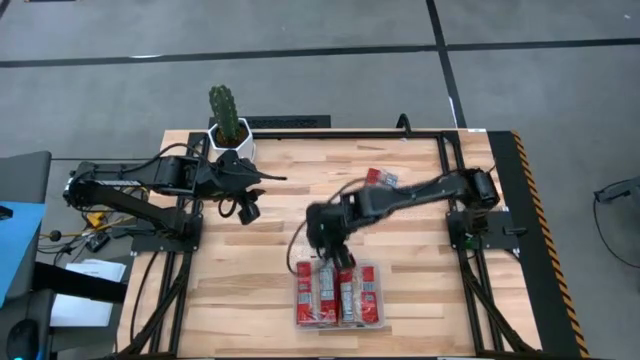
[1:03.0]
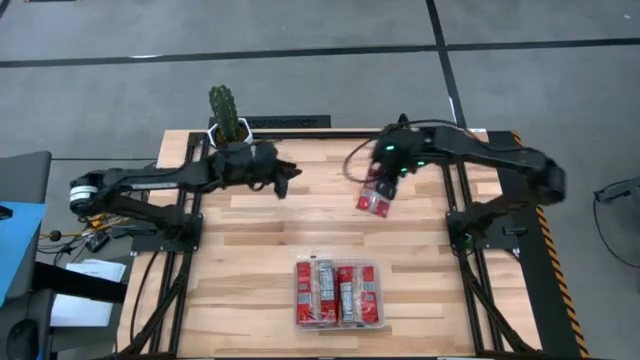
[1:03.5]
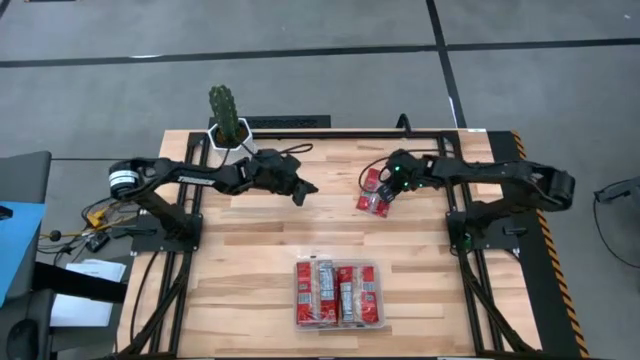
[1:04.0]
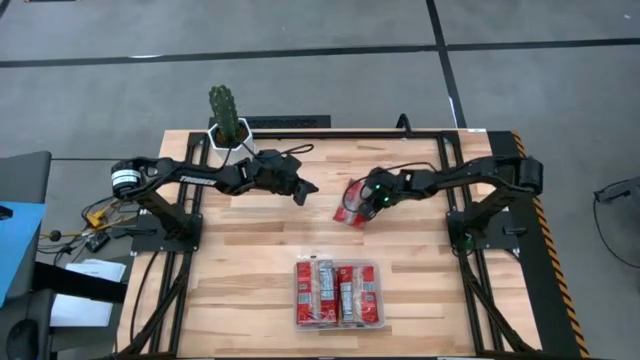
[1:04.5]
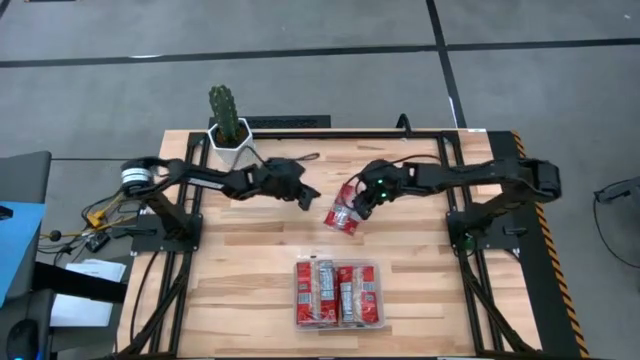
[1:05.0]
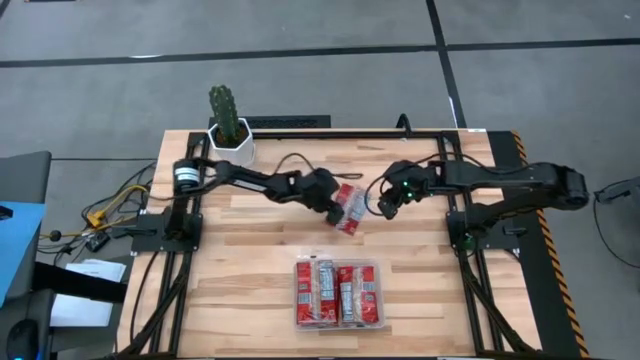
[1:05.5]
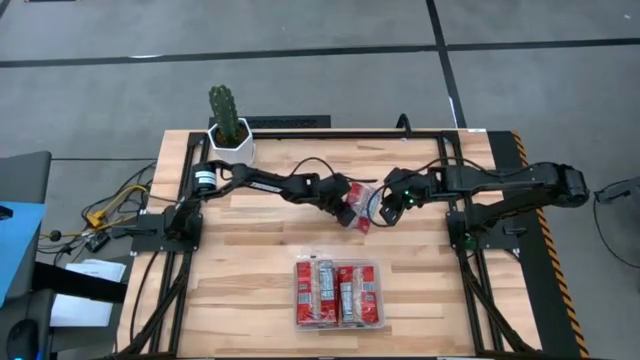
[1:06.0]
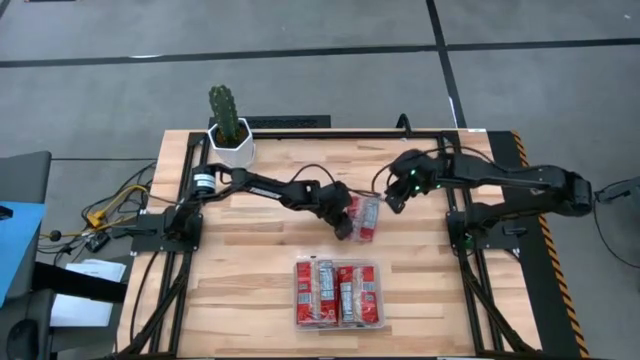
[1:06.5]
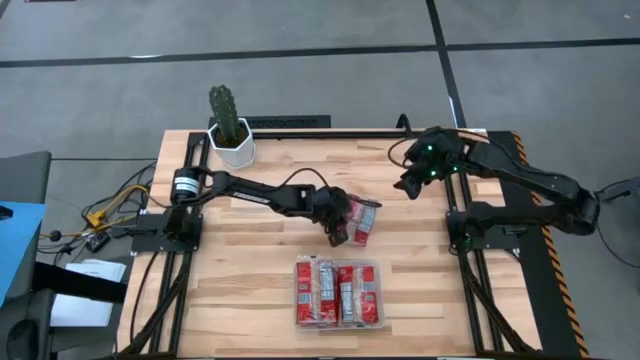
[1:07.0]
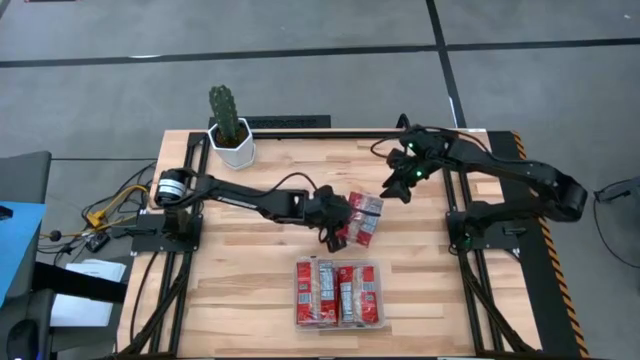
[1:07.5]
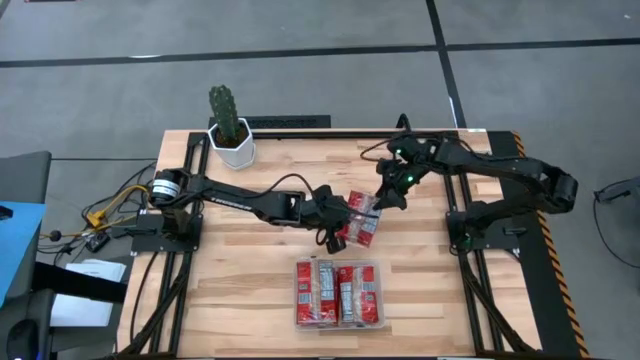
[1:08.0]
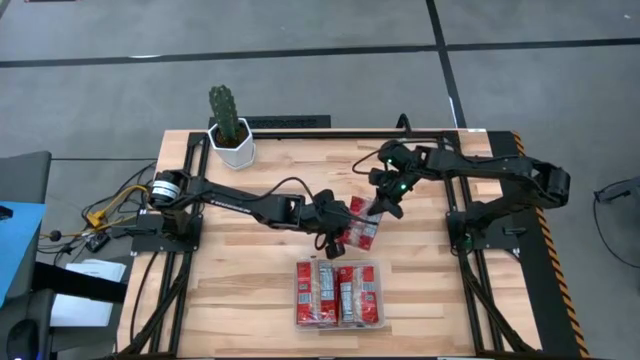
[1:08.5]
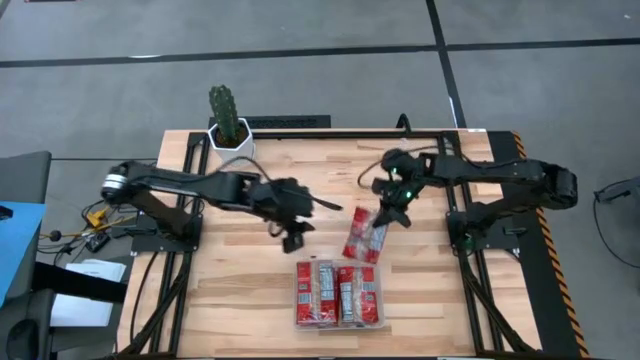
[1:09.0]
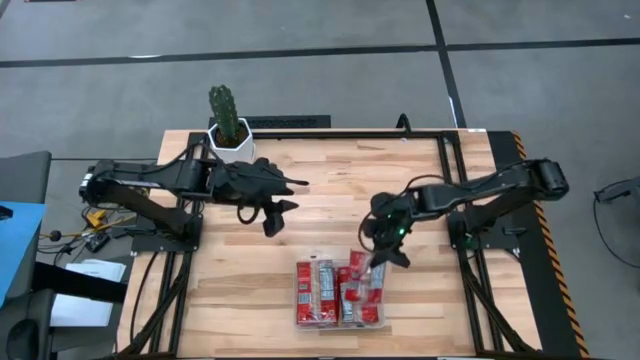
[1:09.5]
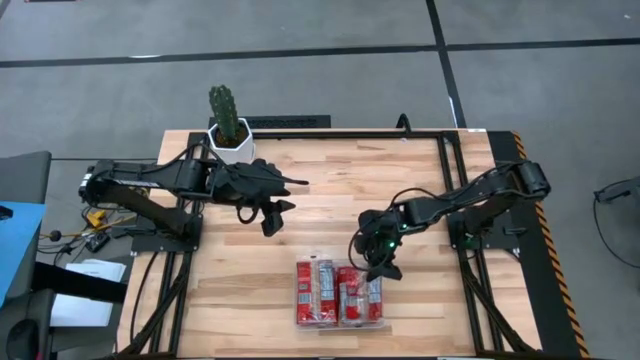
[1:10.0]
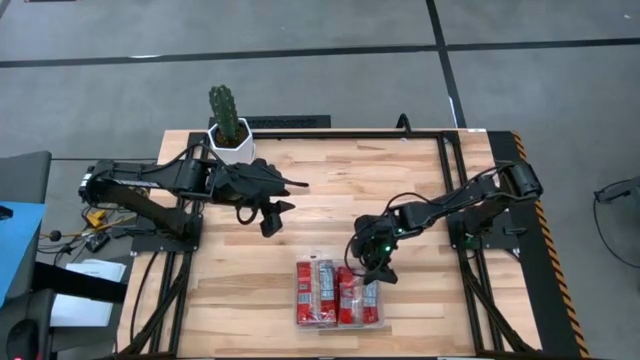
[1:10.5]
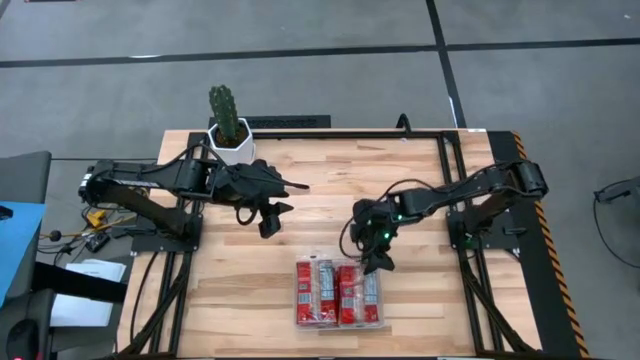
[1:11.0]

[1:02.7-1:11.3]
Task: Sort popcorn bags into baskets
Put the red popcorn bag into the transparent bin

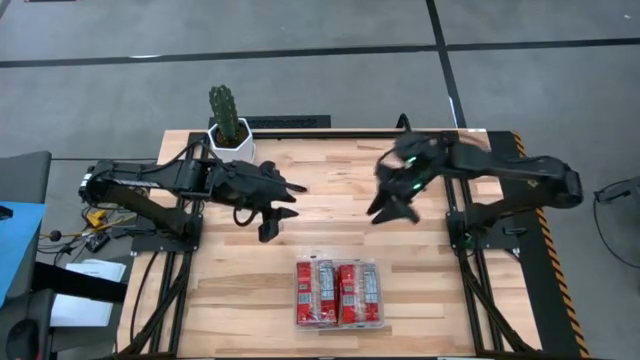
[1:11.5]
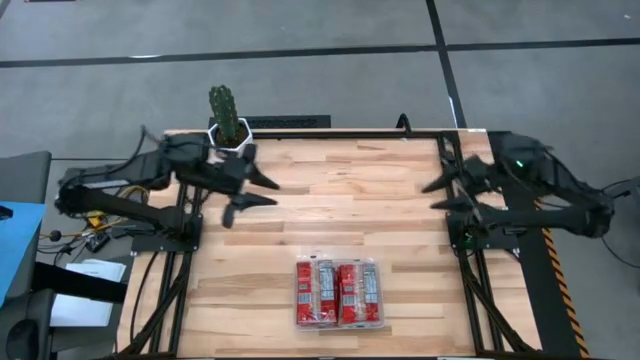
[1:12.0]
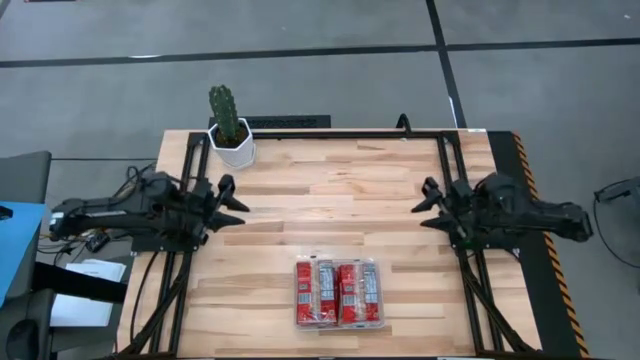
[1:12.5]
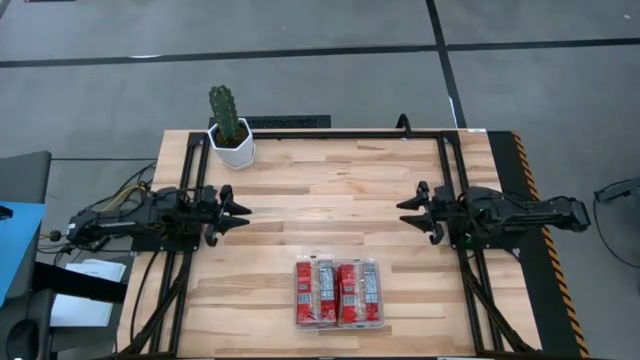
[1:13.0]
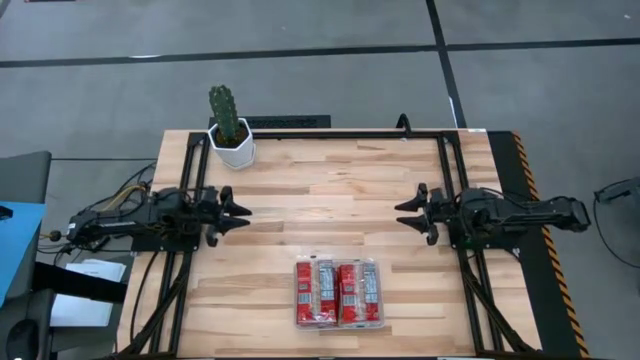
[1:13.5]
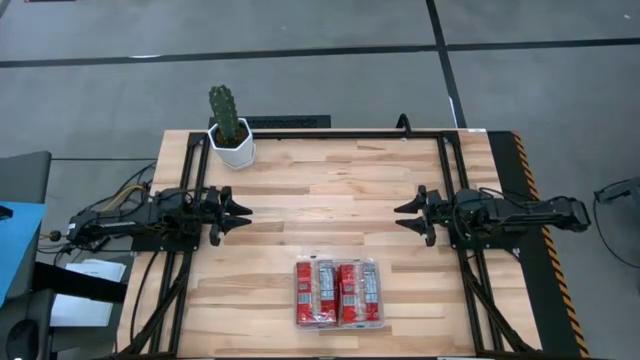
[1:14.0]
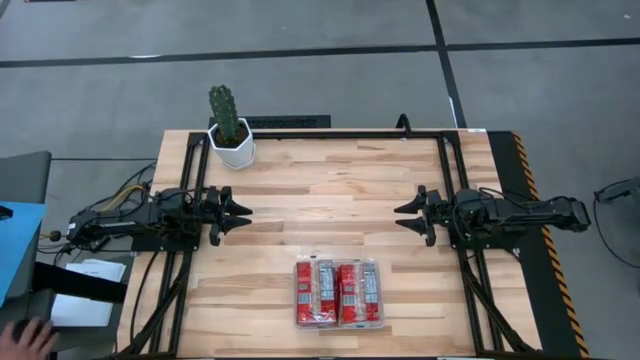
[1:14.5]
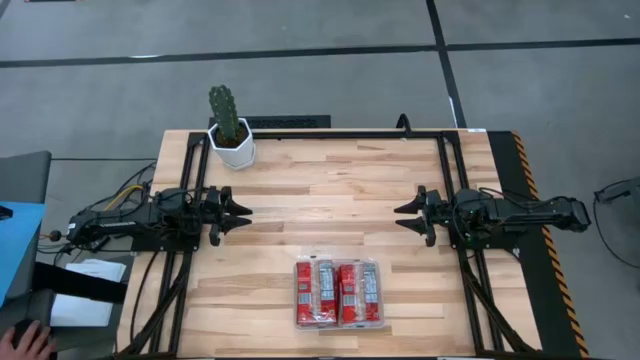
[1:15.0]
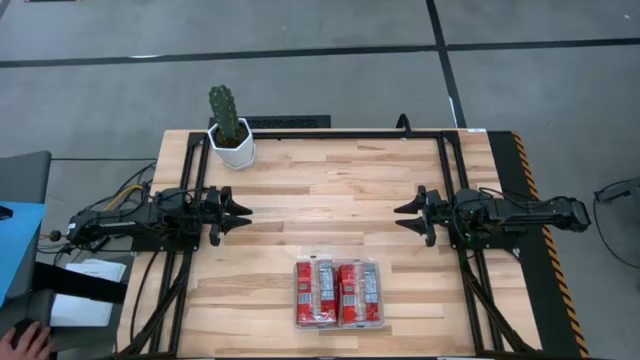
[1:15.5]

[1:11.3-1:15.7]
Return to Home Position

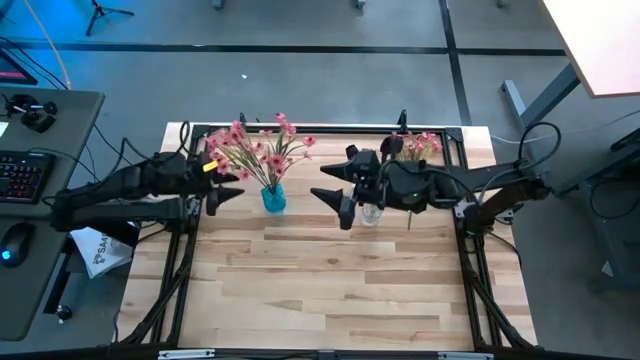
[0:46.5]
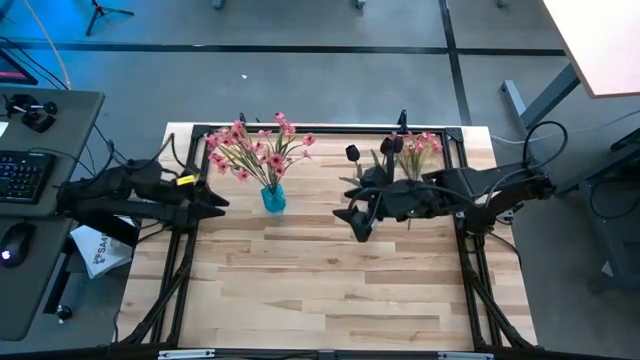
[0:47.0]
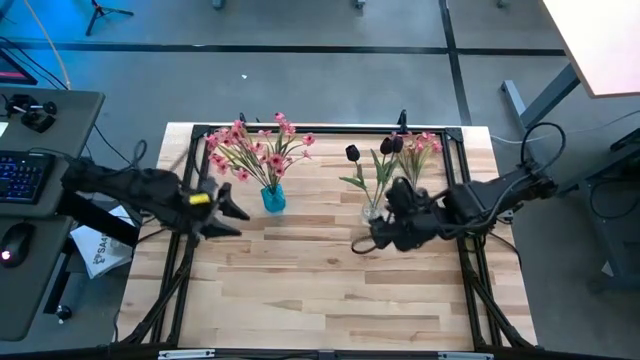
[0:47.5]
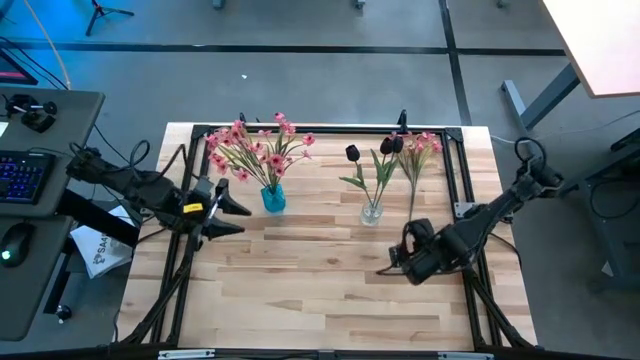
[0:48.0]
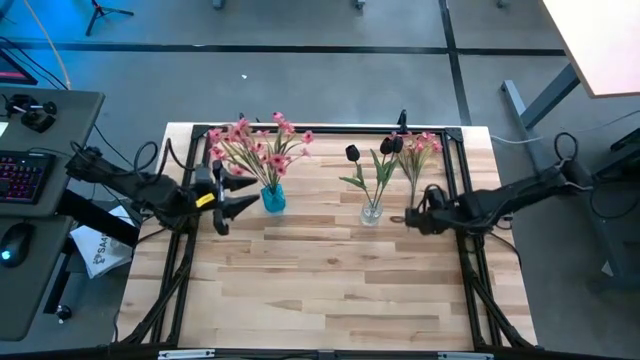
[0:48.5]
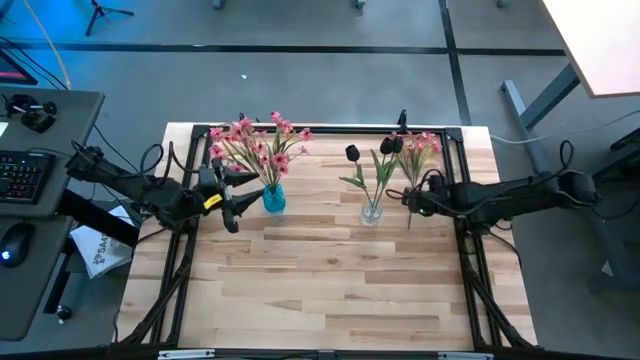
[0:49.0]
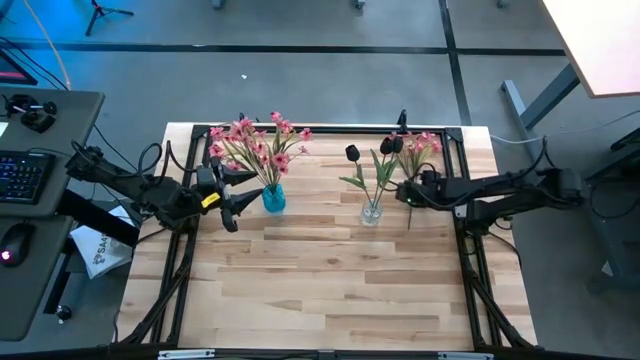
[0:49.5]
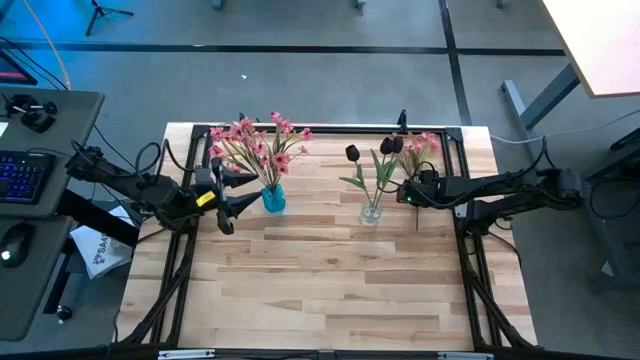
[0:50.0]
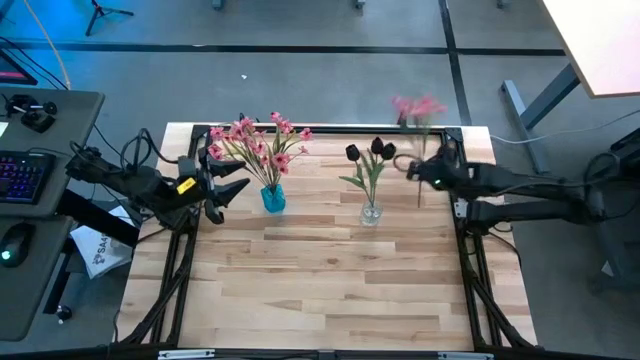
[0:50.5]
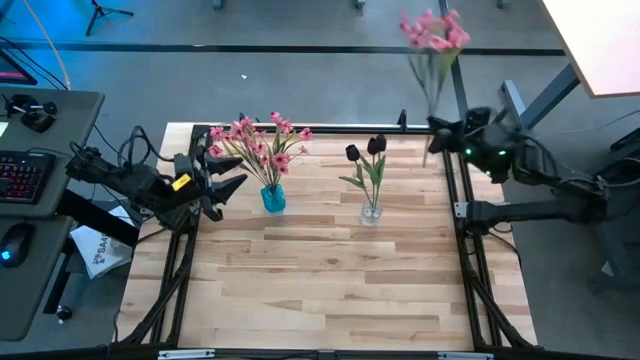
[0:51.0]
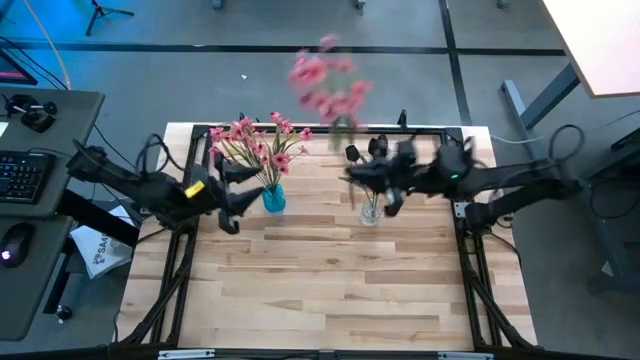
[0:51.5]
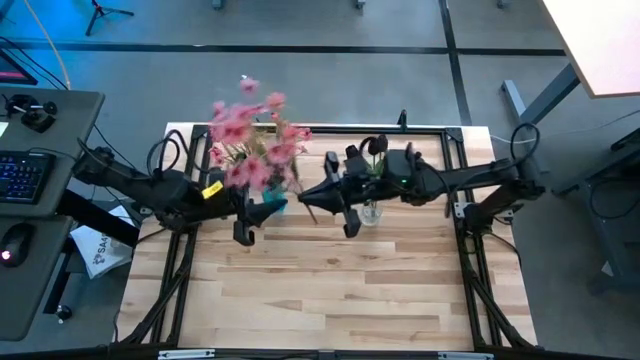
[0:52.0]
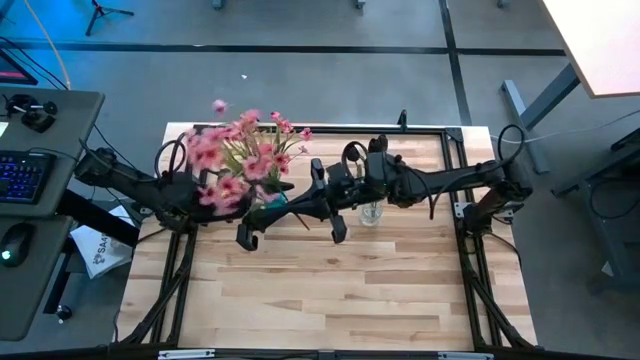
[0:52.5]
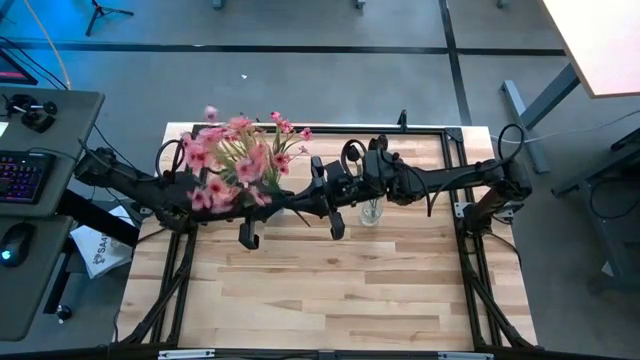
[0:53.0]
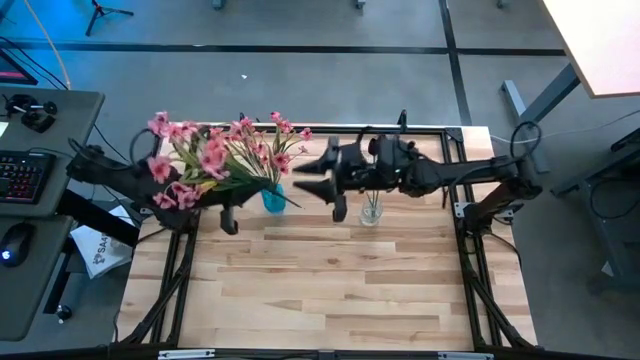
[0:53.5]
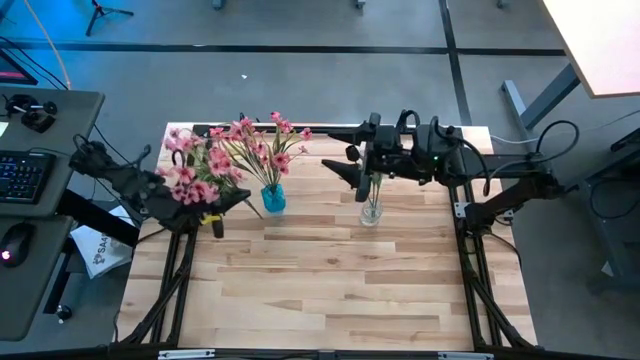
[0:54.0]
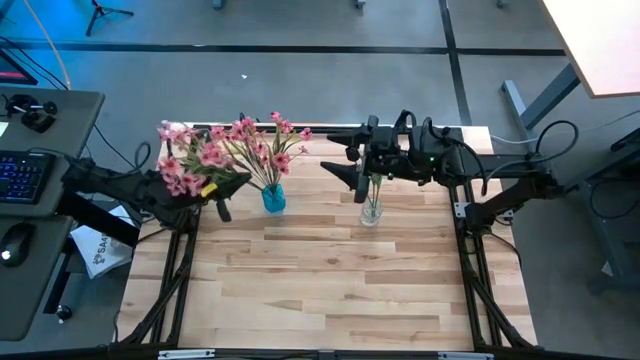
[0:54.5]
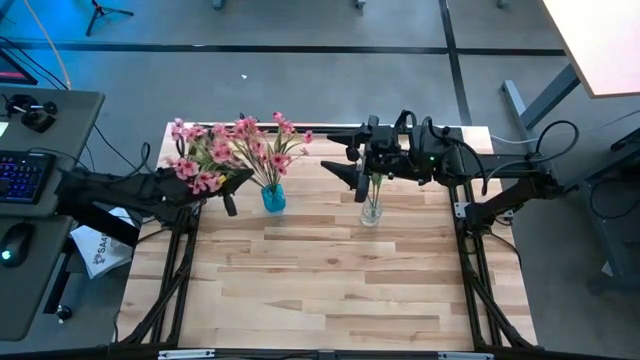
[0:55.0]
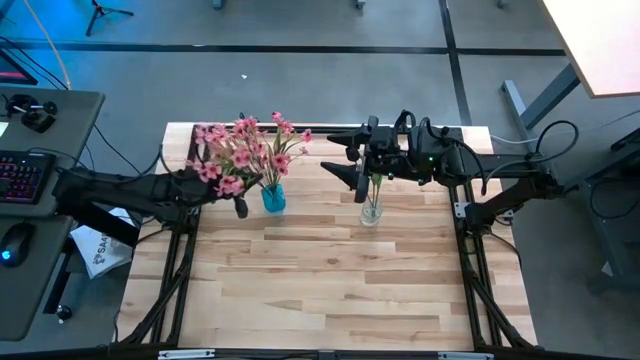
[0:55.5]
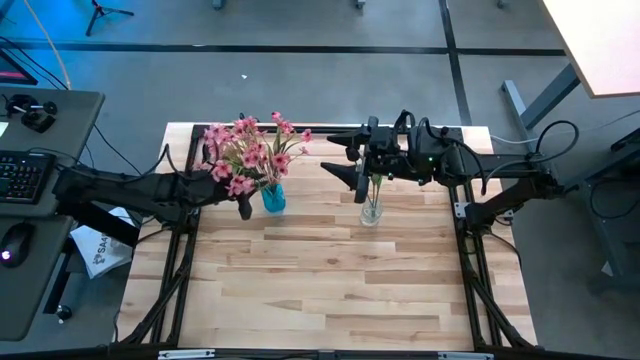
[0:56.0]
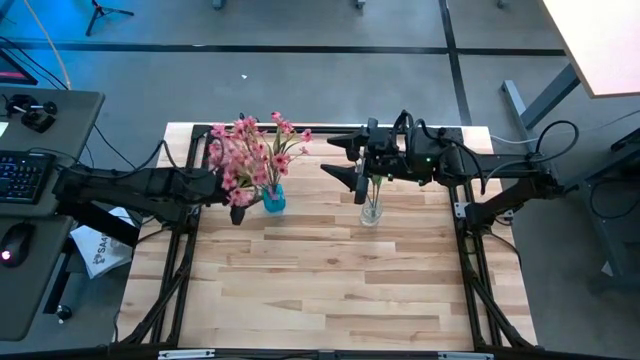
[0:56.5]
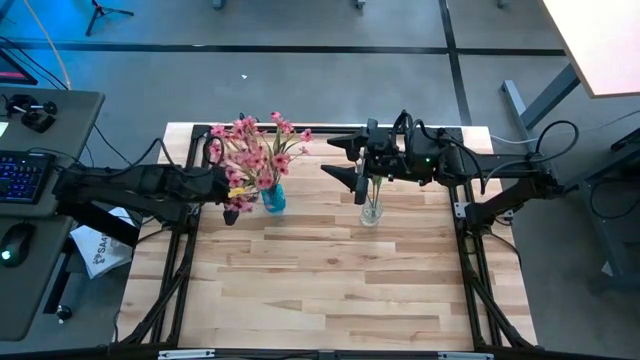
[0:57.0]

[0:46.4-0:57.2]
Task: Sort flowers into vase by color
Put the pink flowers into the blue flower vase
